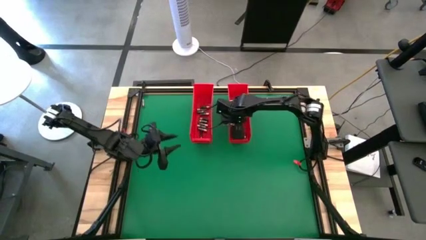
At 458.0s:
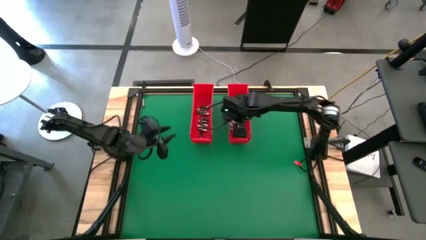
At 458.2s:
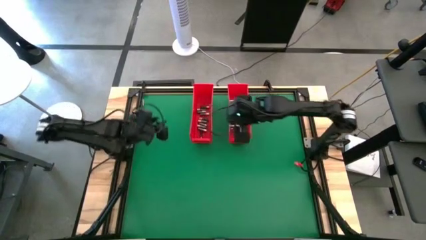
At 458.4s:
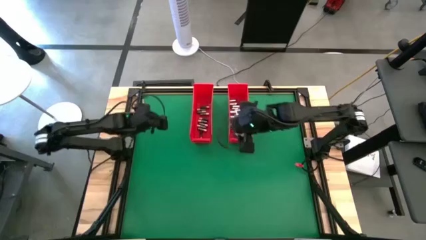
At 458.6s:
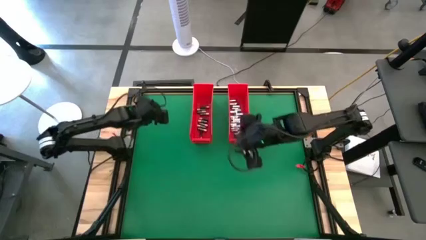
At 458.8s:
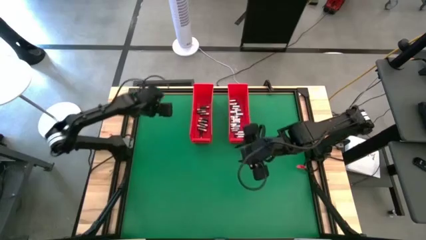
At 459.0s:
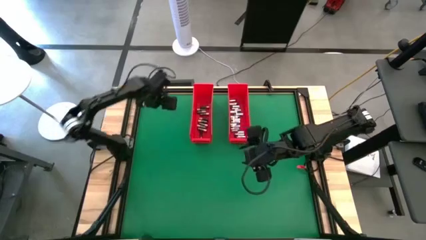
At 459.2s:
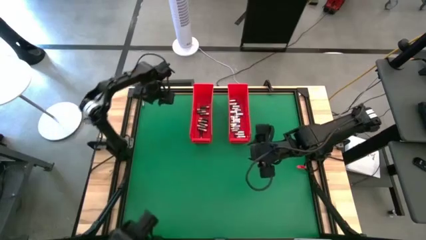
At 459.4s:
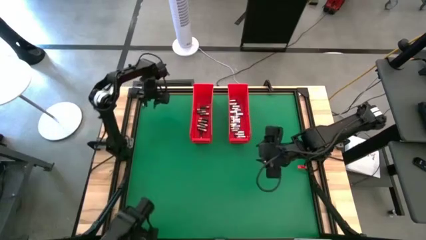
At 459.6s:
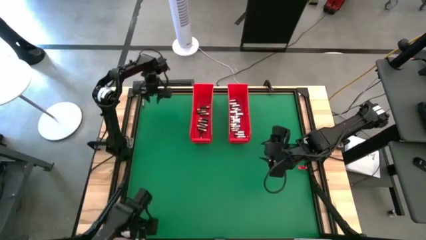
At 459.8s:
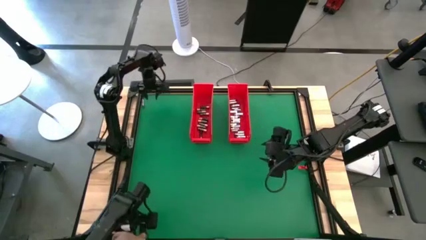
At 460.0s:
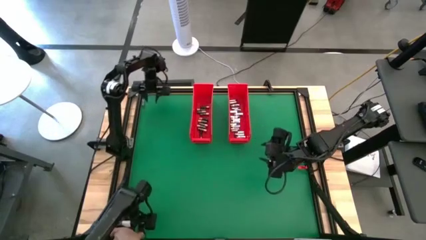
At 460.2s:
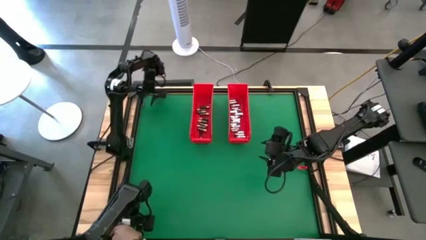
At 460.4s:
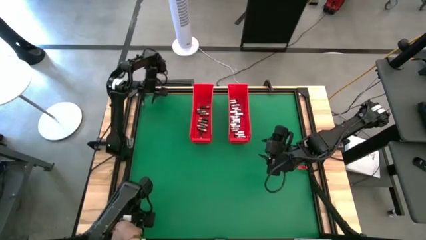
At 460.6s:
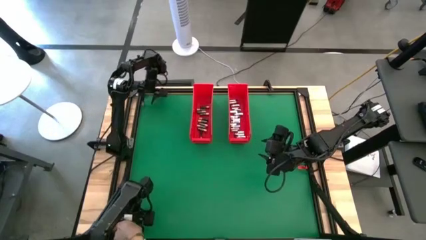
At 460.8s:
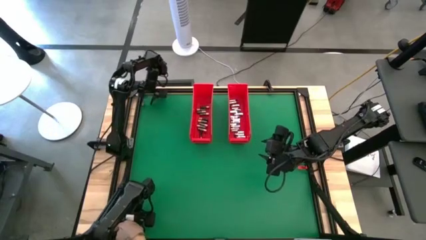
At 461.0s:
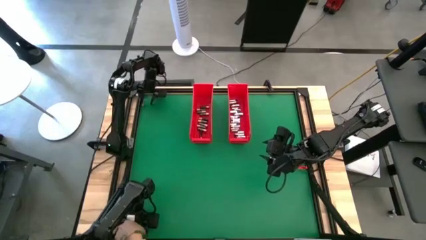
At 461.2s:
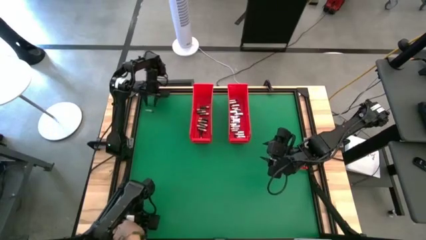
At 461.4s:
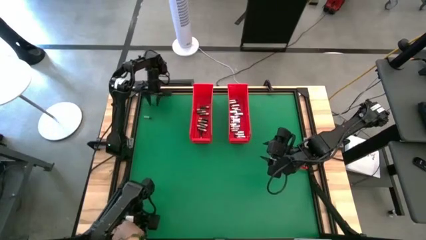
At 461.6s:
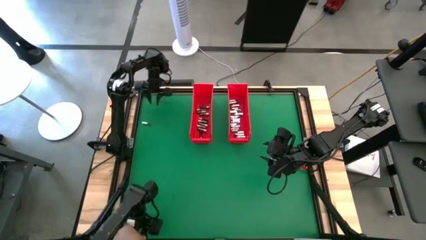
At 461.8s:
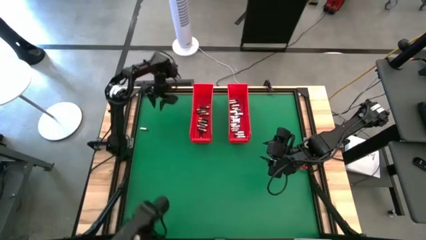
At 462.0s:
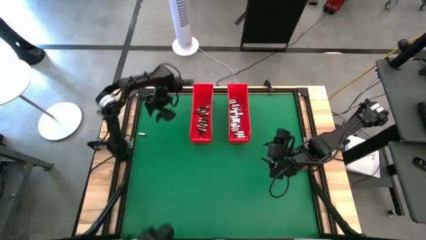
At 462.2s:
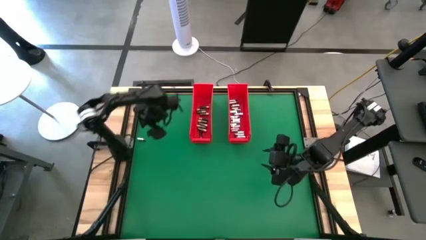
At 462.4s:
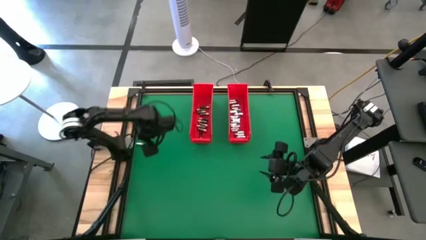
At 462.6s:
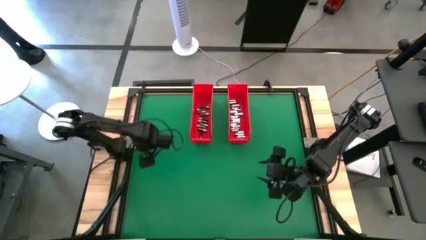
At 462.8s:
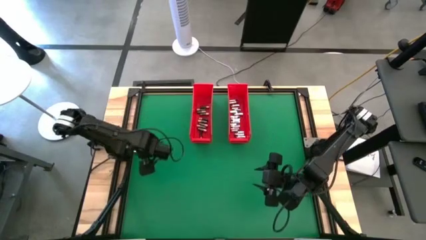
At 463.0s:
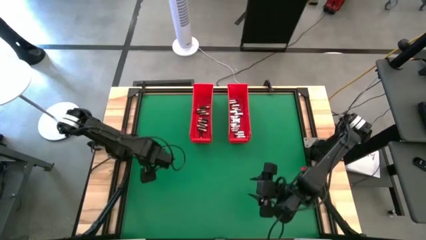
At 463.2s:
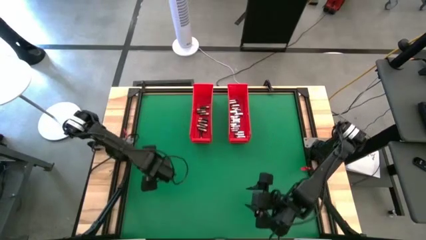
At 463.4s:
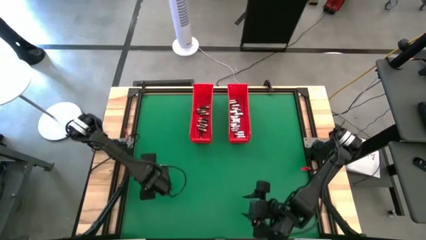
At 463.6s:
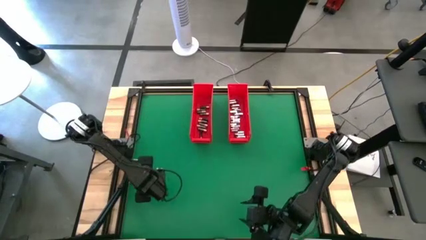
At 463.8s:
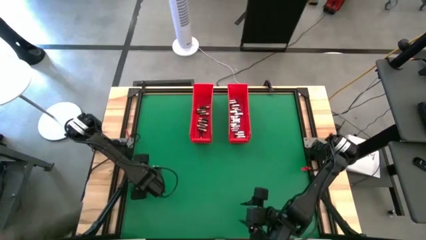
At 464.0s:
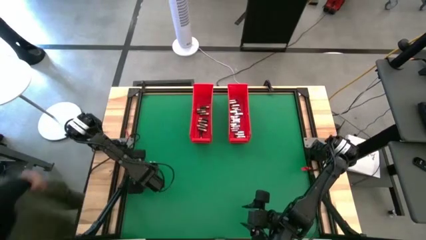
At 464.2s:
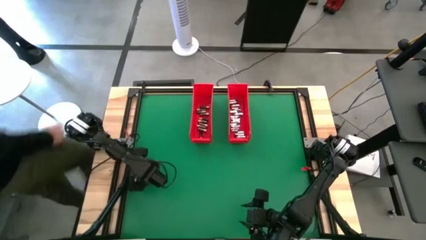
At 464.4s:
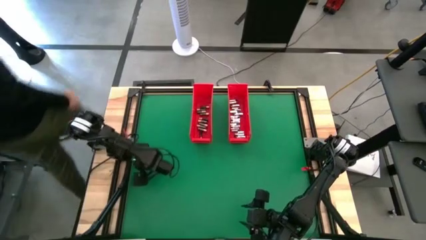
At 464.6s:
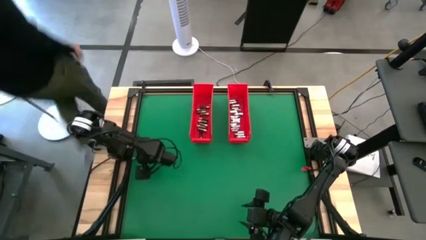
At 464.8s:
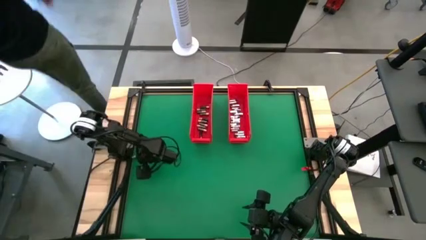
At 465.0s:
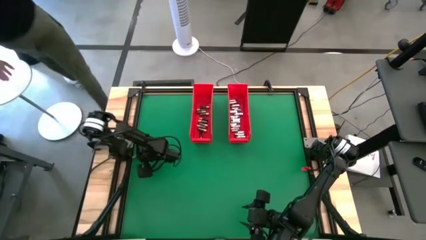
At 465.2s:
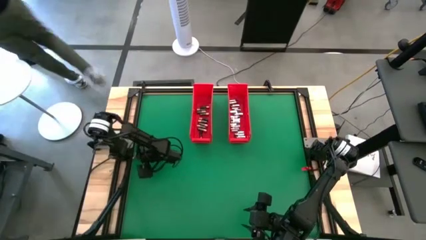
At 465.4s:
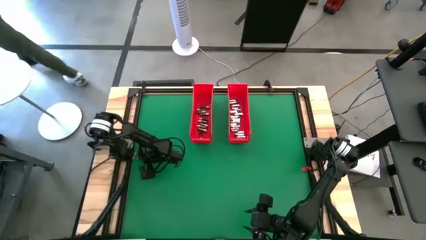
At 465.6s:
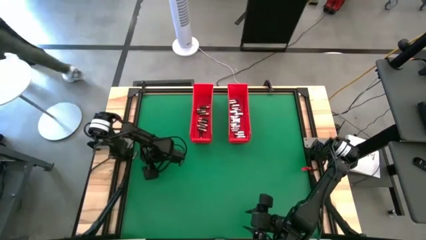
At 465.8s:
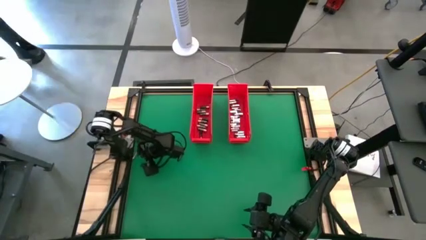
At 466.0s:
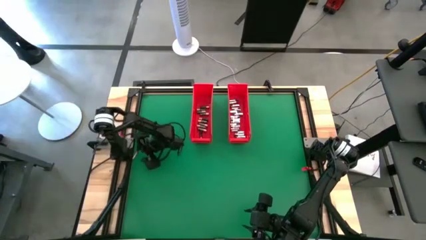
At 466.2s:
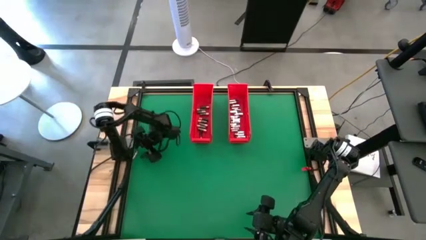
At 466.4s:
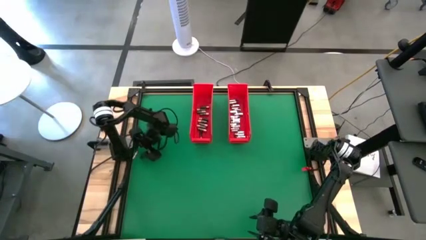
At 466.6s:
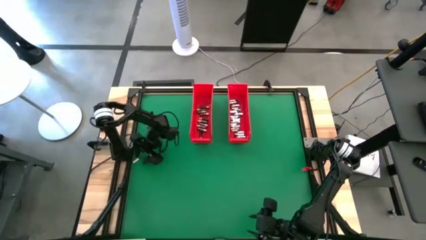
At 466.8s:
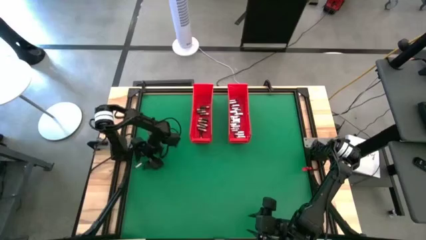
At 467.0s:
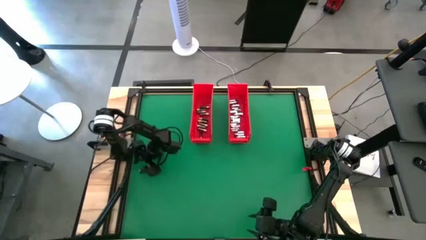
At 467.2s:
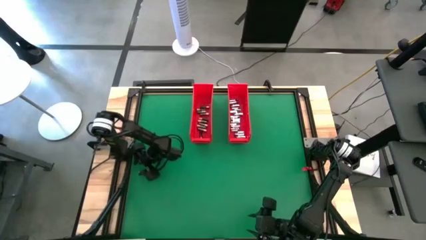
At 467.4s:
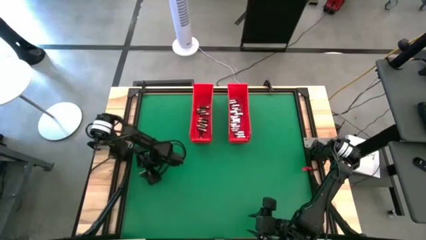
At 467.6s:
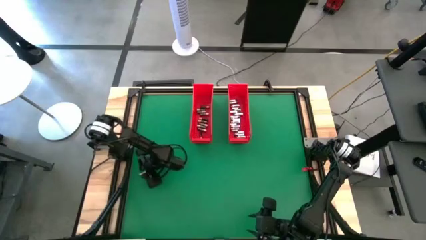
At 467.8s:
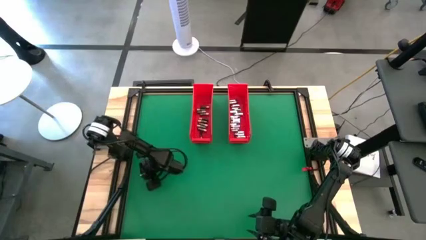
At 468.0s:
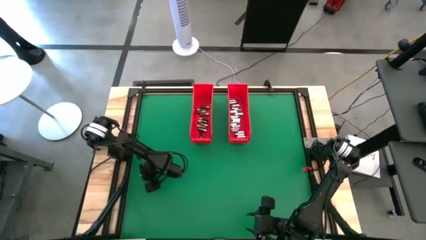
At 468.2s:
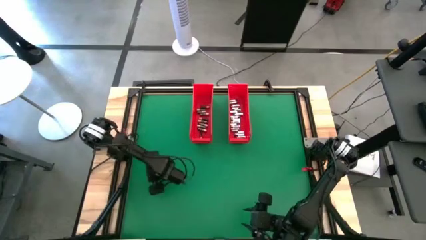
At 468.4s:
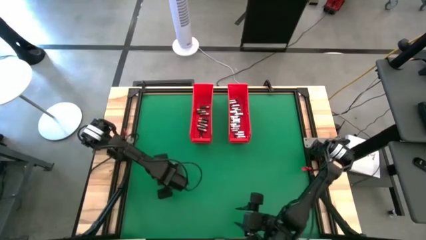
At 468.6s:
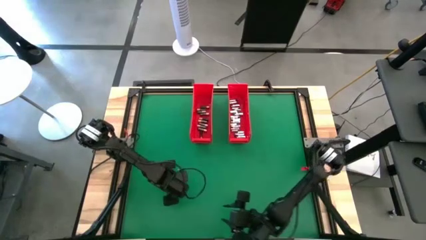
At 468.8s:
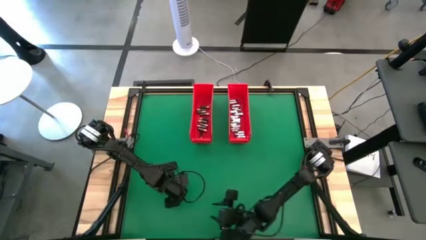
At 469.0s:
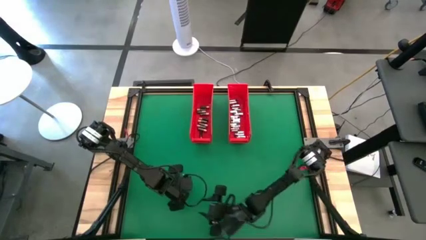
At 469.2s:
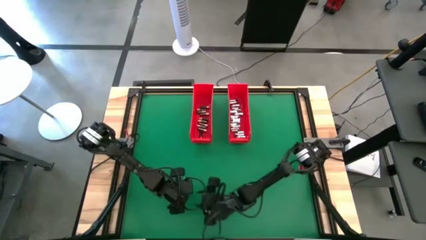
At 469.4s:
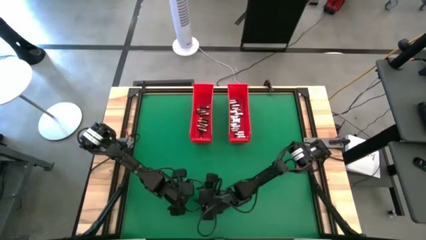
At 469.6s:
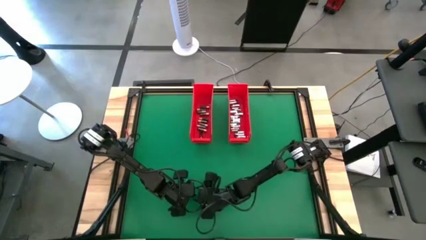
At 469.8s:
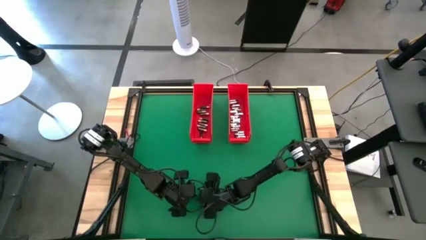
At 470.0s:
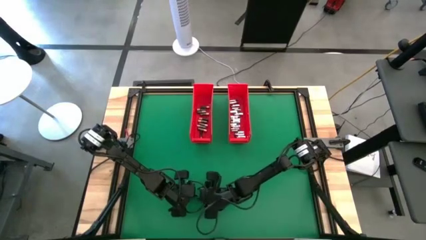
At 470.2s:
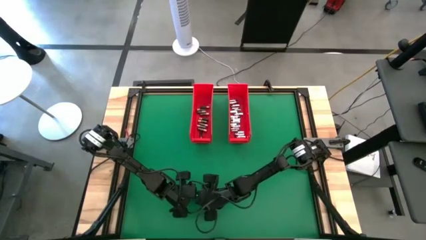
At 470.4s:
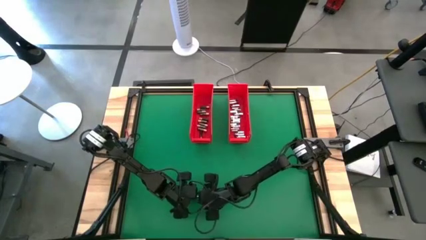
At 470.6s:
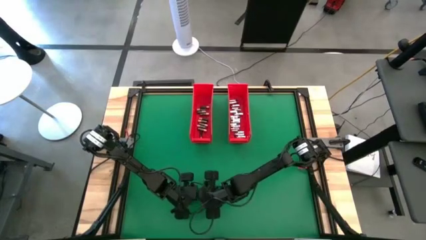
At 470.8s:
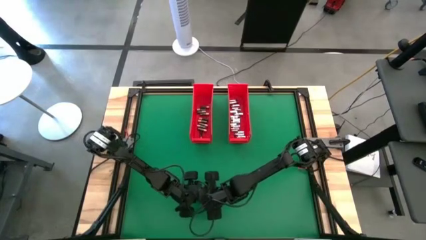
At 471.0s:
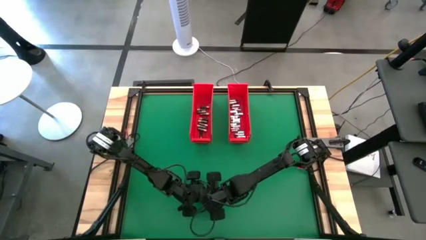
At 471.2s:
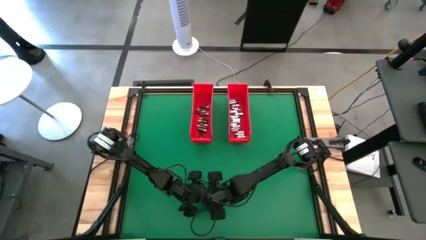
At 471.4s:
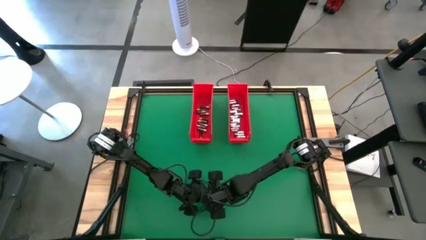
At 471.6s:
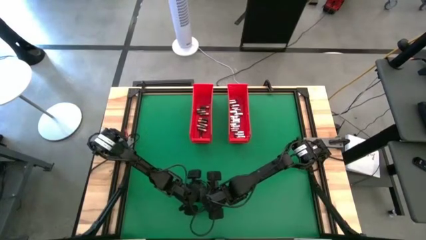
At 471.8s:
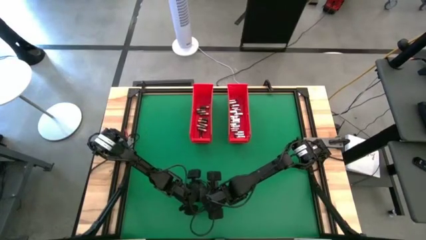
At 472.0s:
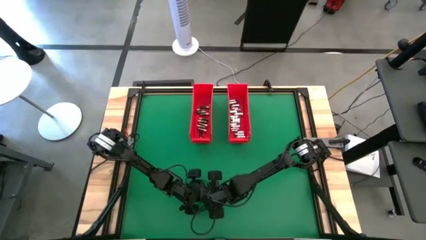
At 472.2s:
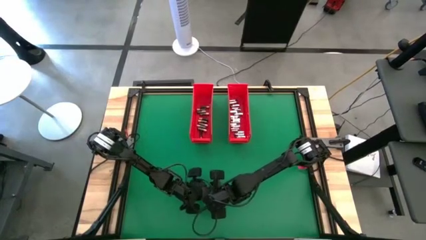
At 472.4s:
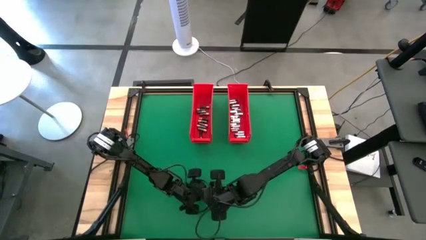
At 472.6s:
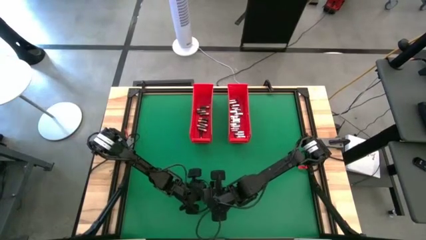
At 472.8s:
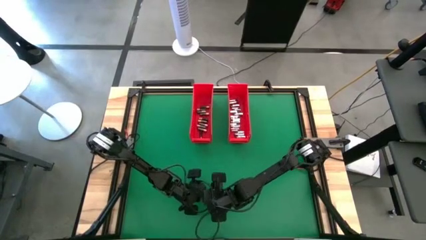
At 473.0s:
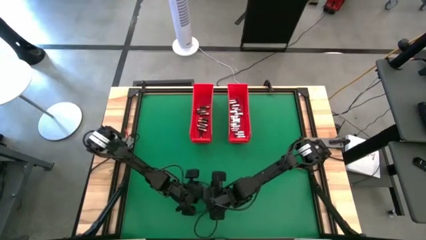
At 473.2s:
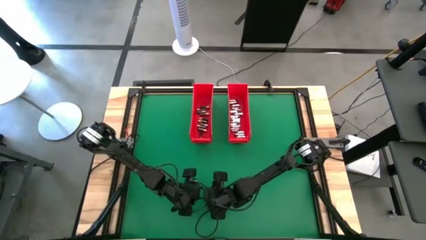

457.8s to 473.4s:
Task: Sort batteries
Put the silver battery into the right red bin

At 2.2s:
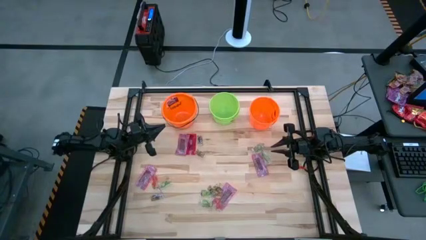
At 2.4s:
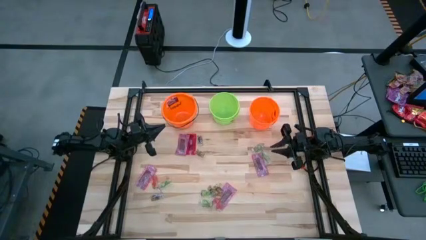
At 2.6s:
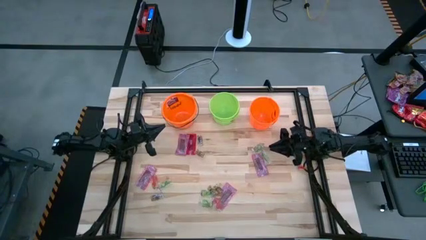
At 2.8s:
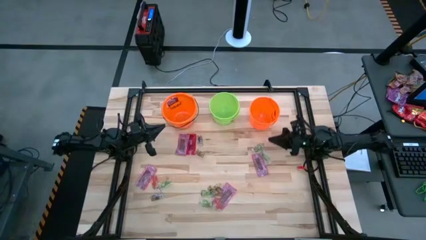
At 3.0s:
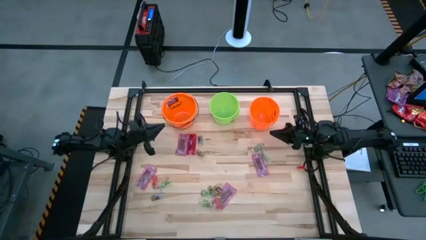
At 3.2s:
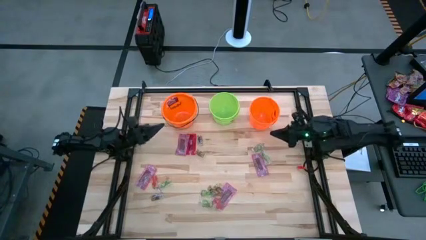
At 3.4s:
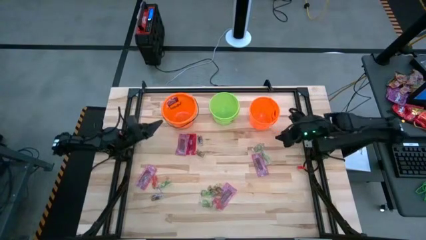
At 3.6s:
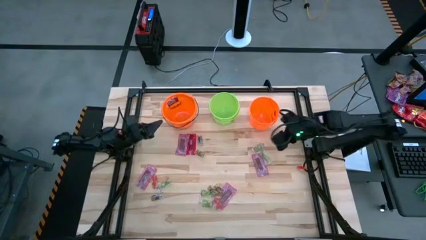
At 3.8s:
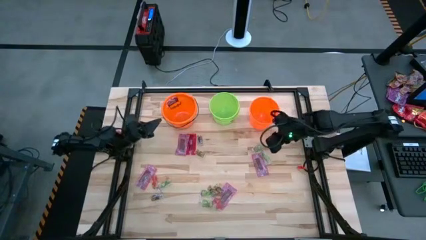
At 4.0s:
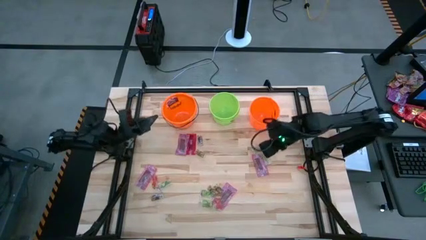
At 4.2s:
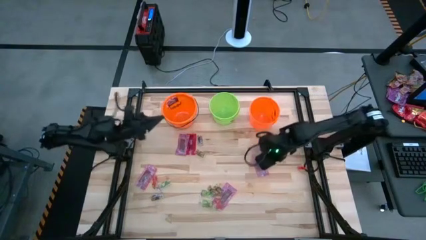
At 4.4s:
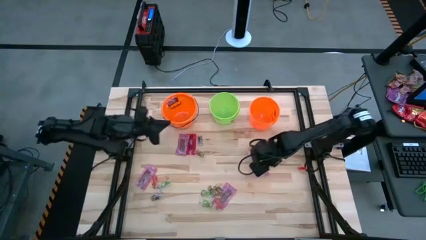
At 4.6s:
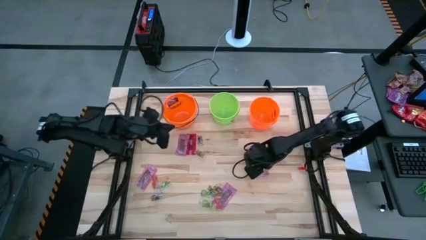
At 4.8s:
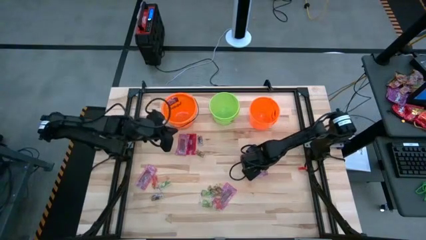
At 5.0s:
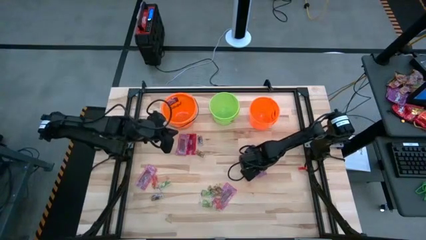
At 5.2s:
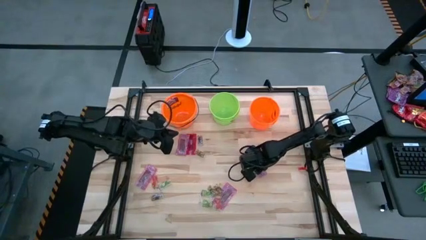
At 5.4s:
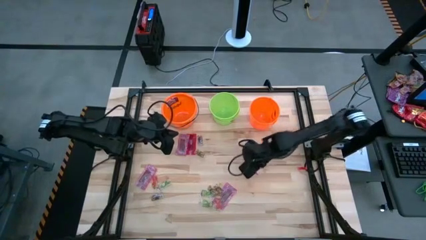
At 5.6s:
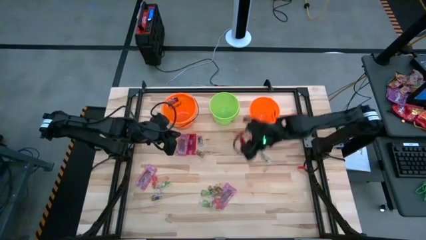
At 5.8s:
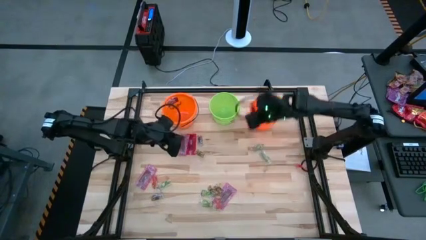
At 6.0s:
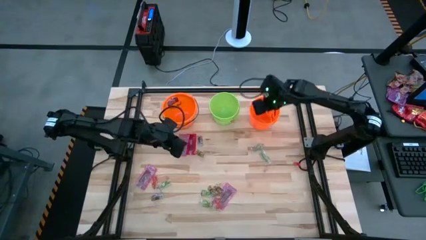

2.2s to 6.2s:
Task: Sort candy by brand, put in halloween buckets
Put the red candy into the left orange bucket
